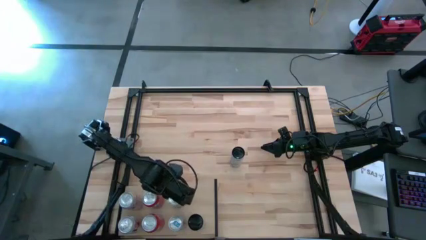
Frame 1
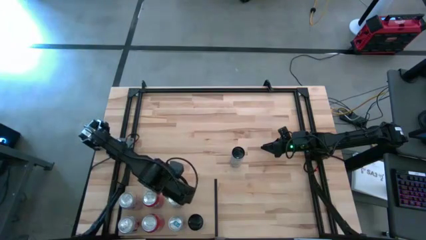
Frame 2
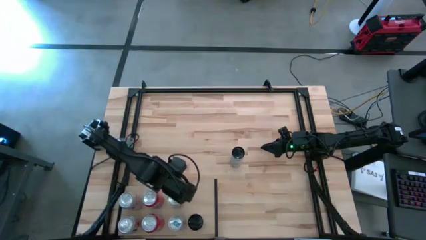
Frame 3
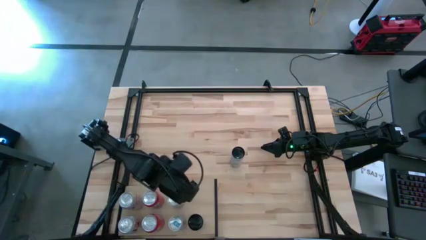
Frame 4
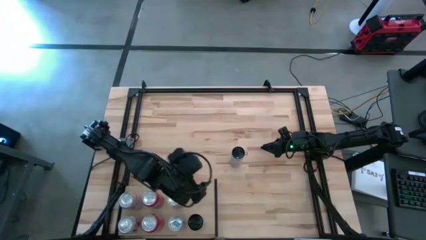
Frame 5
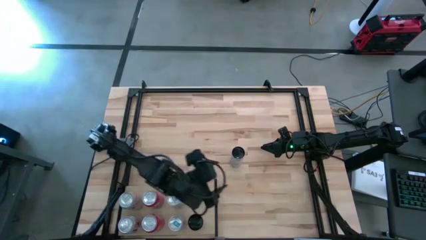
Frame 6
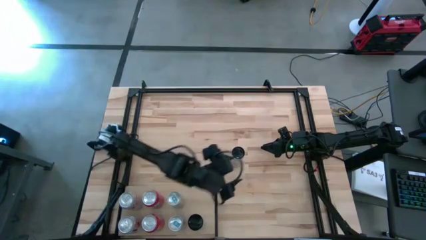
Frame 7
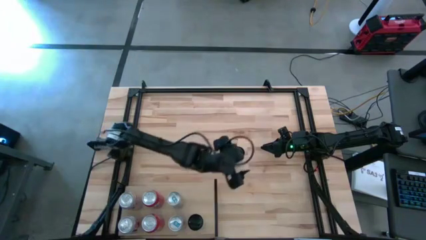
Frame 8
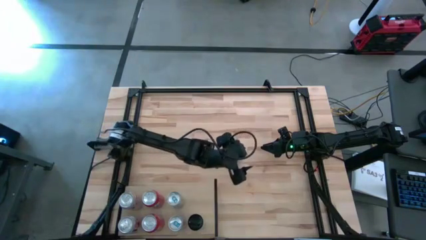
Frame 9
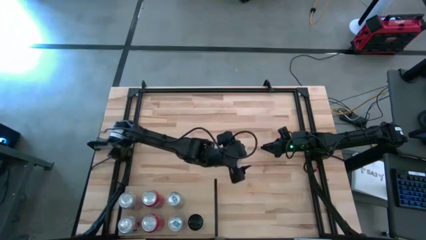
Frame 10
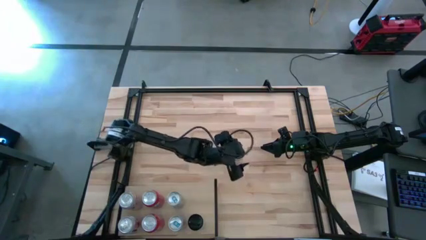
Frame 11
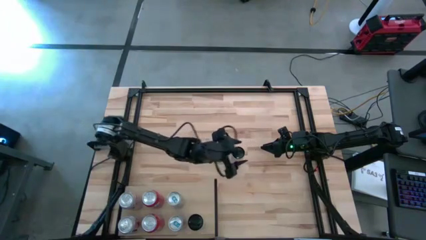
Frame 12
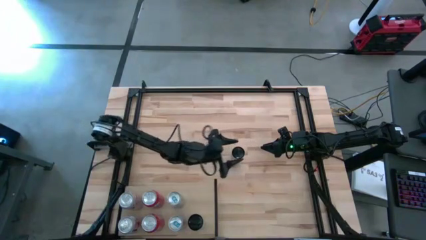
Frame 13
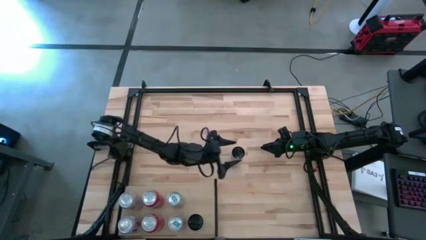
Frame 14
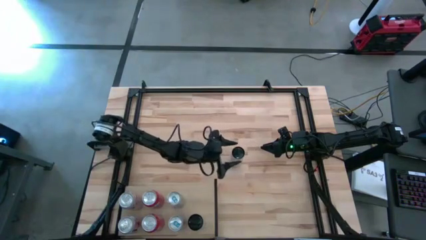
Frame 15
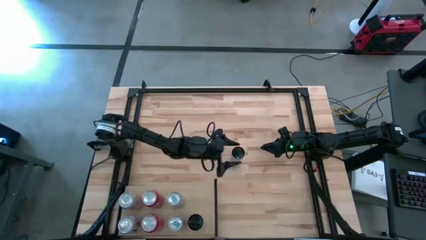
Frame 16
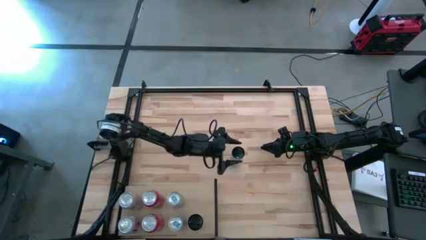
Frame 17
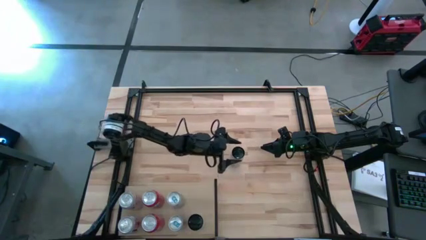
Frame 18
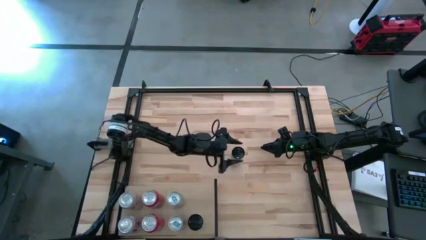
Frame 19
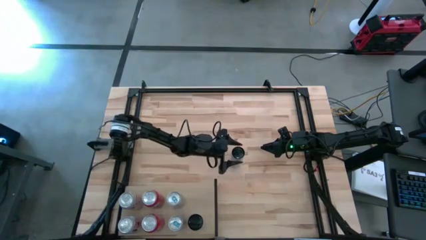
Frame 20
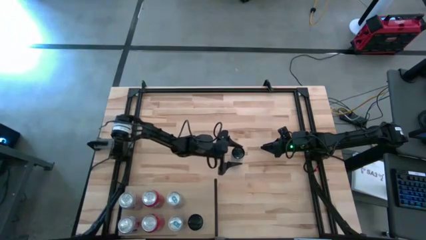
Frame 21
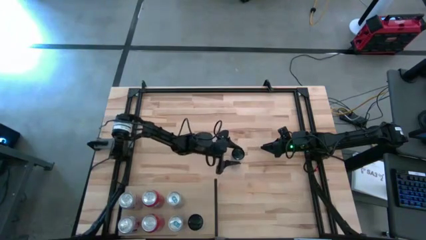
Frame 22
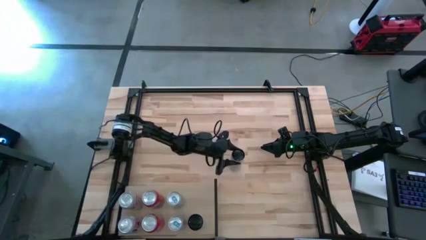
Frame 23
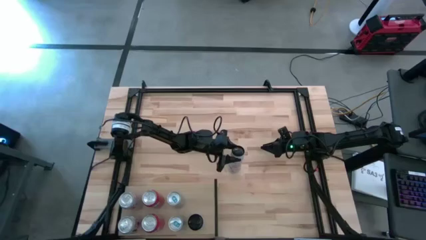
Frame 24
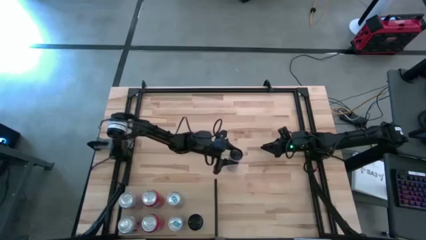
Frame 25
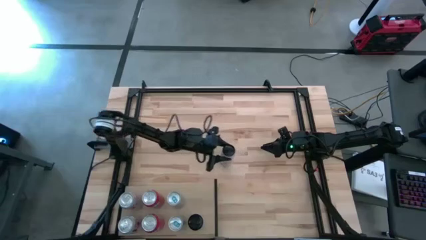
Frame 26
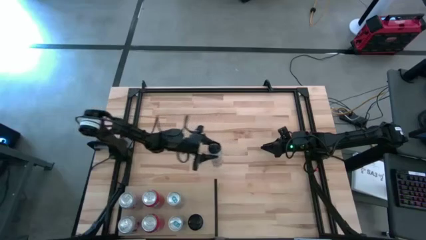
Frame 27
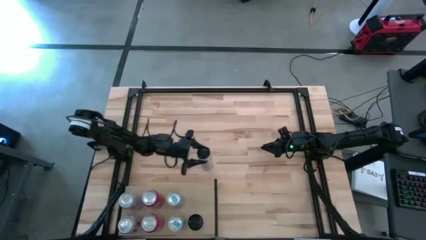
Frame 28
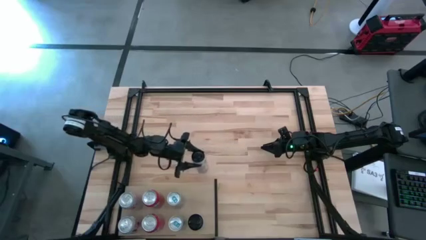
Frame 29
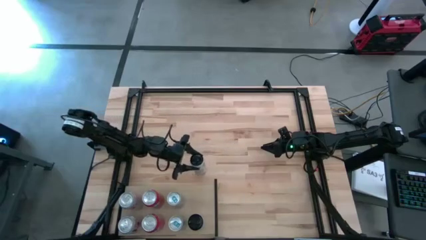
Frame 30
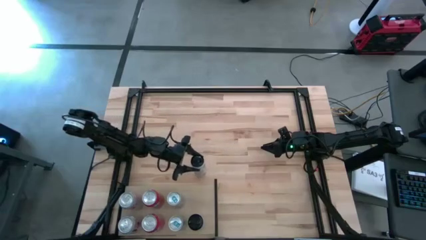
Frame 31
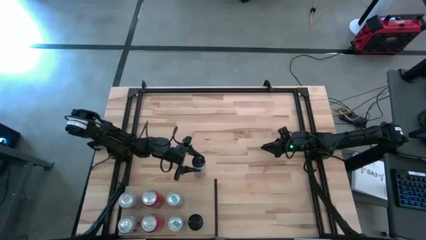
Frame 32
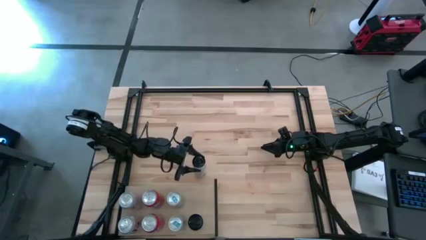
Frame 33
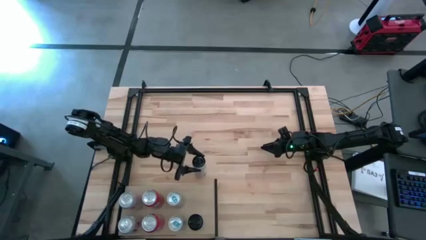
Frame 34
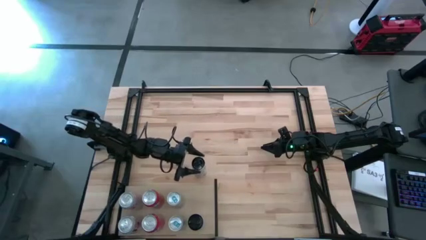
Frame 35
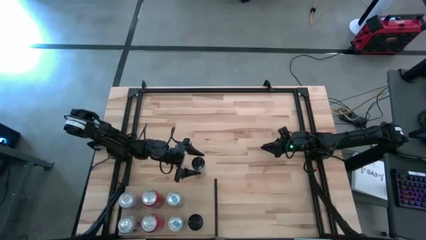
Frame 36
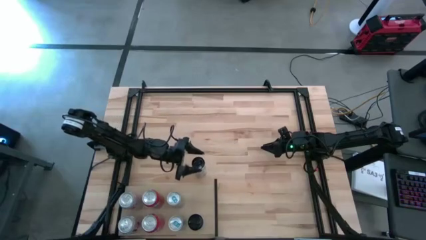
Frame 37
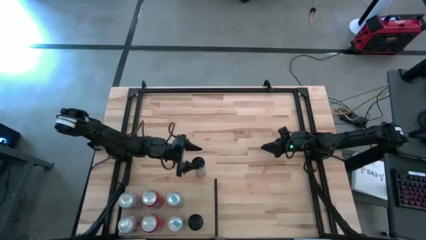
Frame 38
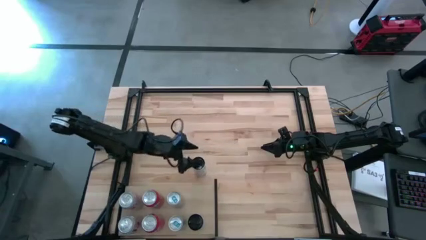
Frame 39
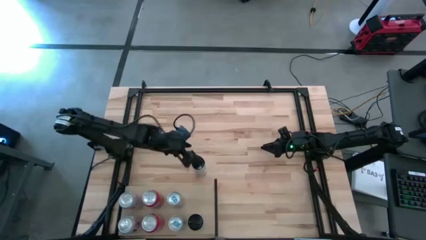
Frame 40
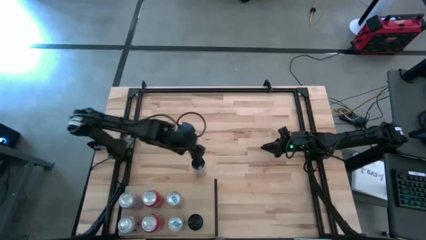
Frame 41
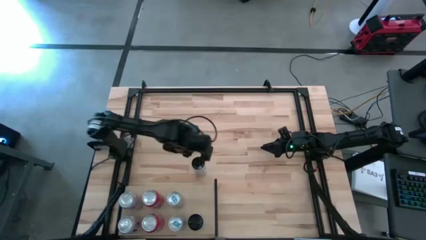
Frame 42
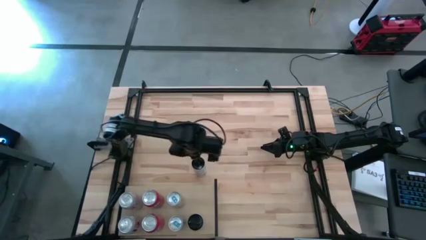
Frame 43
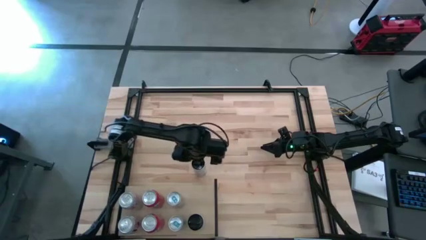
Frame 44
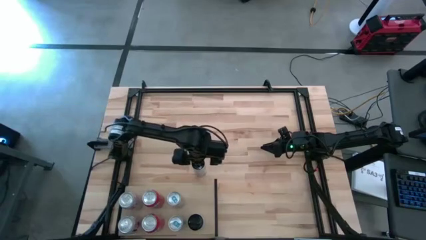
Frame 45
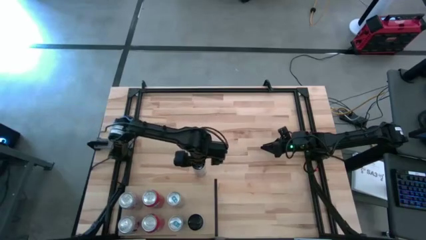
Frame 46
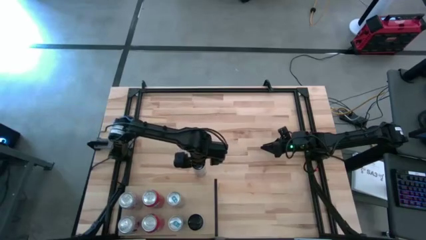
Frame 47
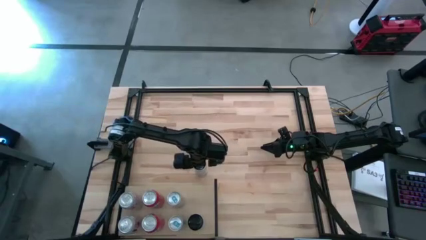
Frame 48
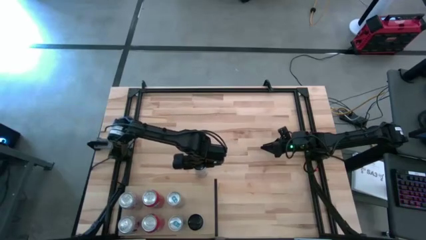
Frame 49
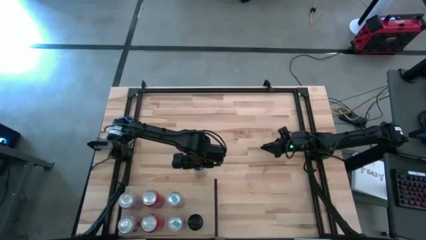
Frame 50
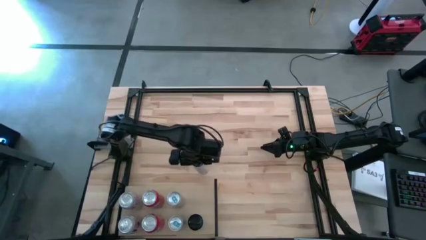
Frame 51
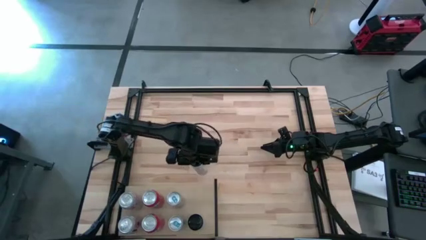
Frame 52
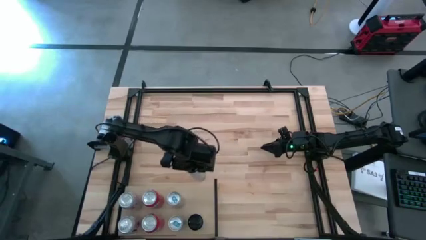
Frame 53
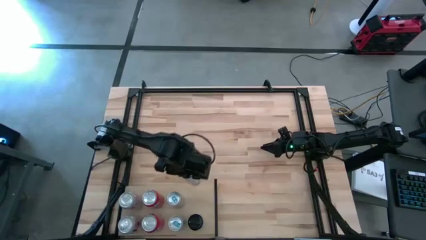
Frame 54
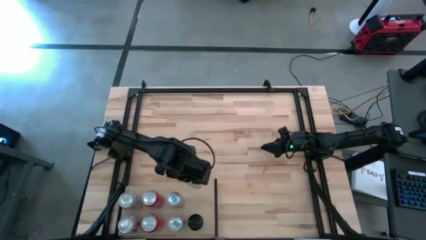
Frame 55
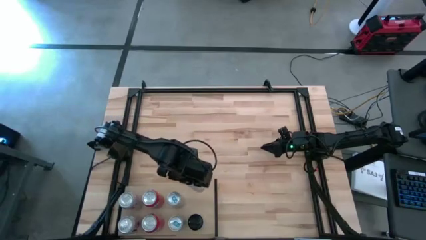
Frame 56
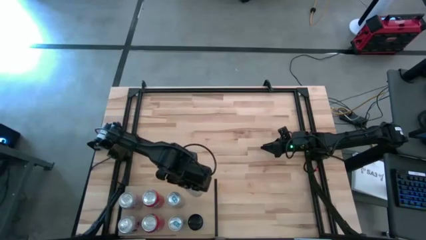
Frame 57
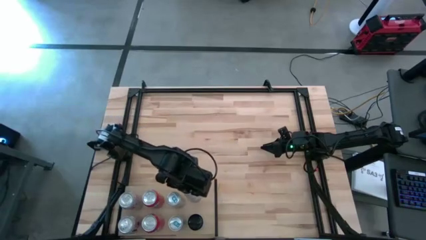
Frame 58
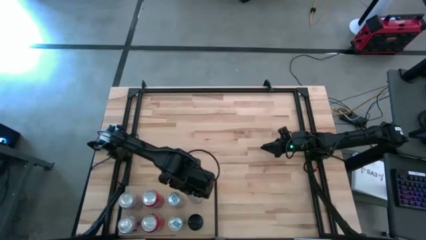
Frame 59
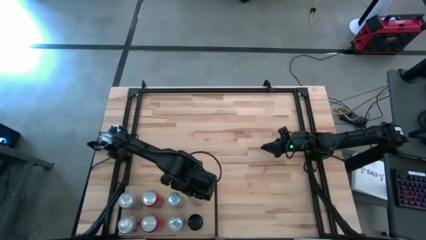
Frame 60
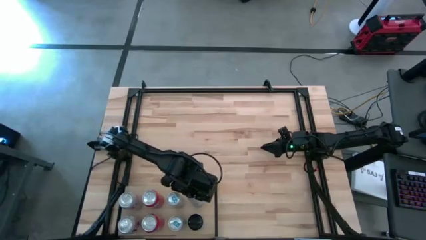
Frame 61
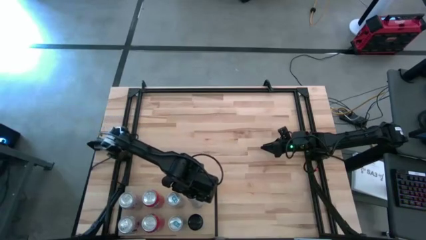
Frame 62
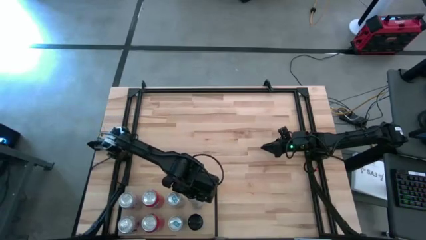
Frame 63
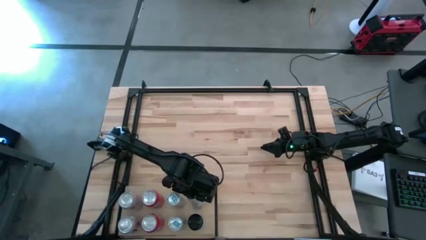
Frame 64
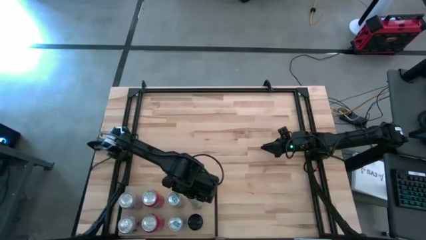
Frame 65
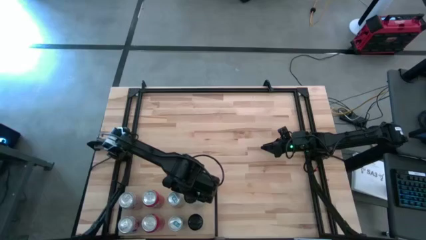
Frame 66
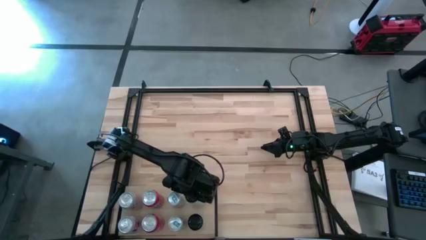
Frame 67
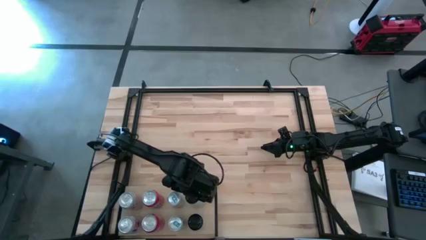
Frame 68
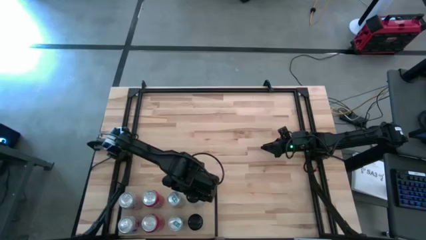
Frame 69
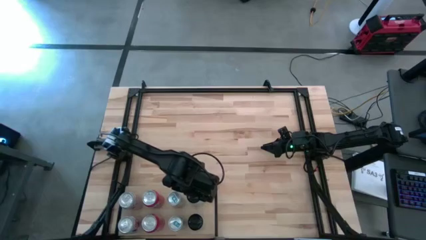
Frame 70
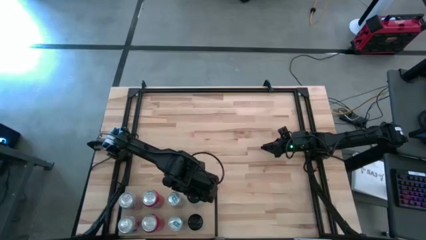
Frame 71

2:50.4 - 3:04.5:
Task: Place canned beverage on shelf
Put the white pink soda can on the shelf aligned with the other white pink soda can

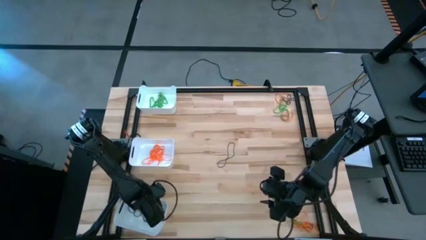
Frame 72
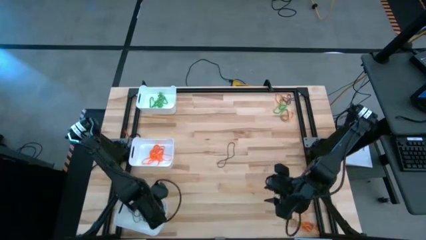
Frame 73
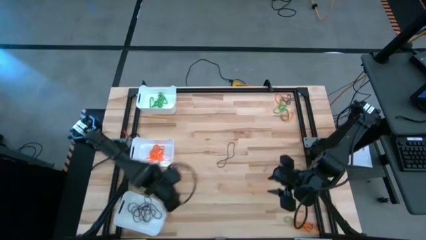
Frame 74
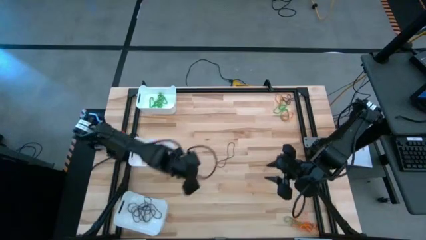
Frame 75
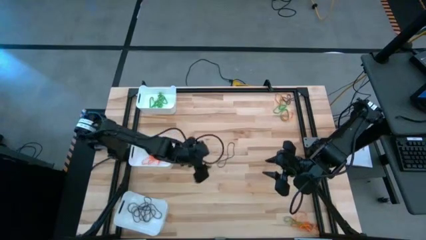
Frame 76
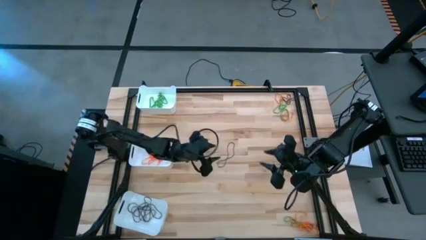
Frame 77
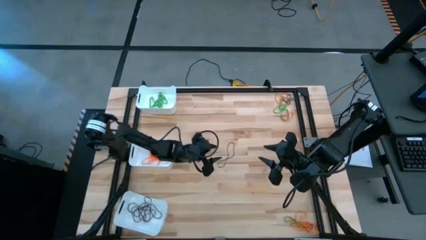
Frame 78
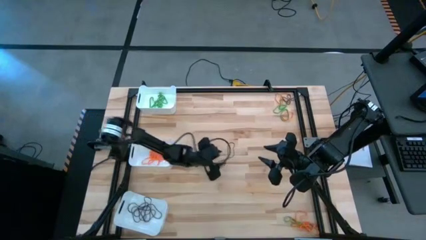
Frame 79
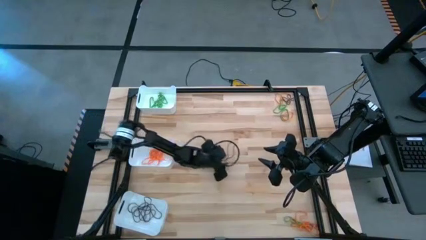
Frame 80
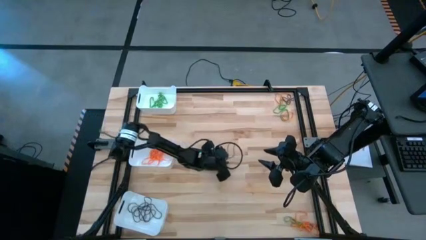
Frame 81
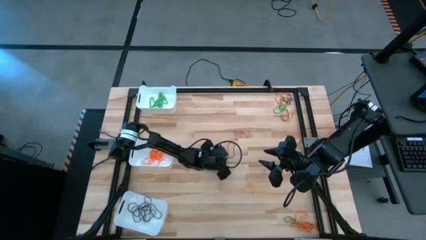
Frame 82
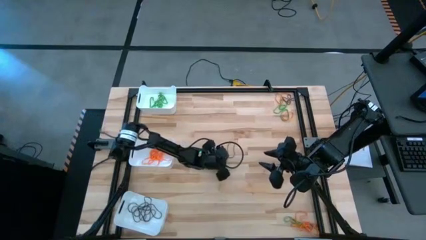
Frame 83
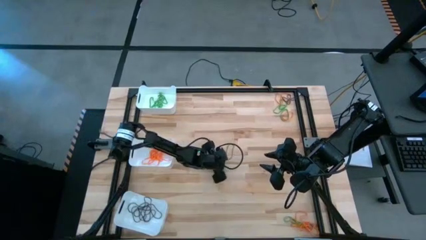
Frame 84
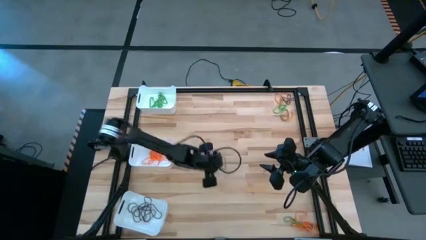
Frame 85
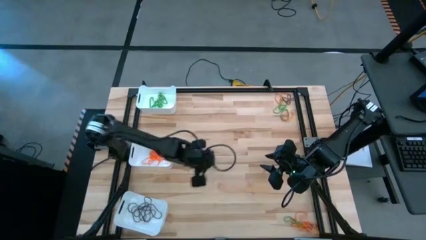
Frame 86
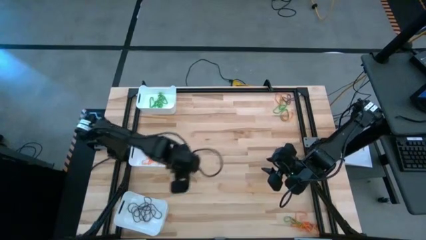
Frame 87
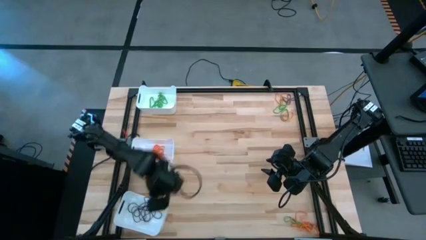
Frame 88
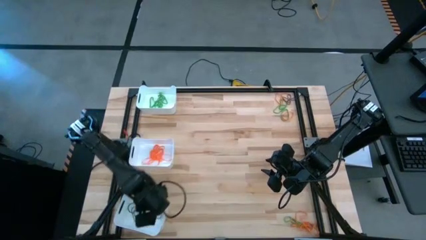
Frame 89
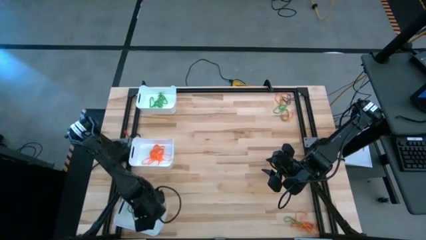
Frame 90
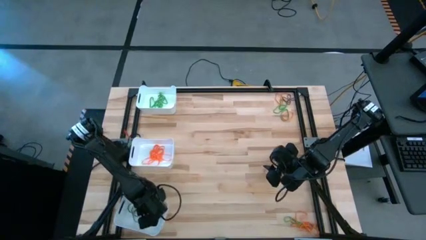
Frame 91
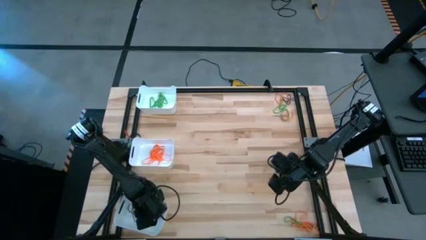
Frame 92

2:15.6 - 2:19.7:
Task: Sort rubber bands into baskets
Put the black rubber band into the bottom white bin
